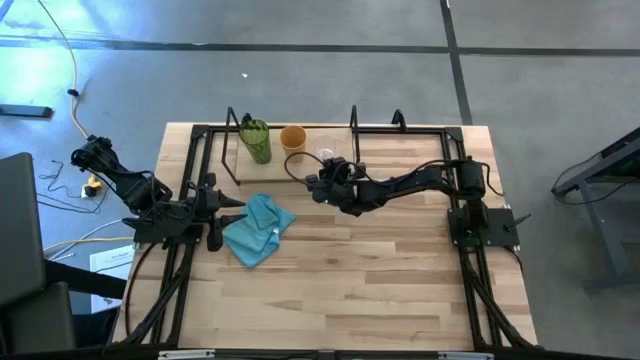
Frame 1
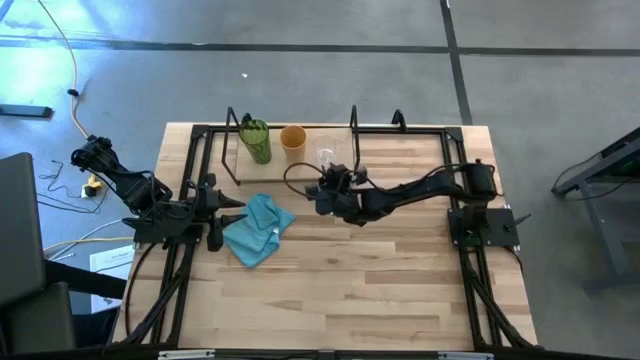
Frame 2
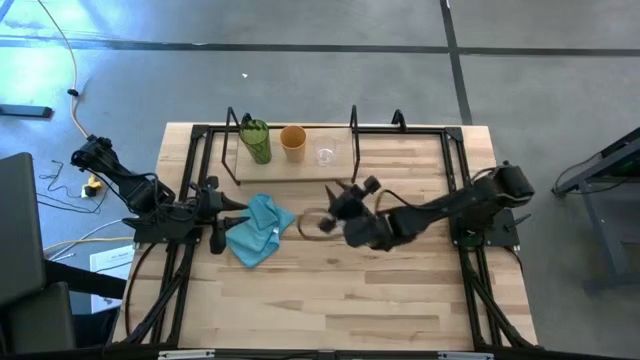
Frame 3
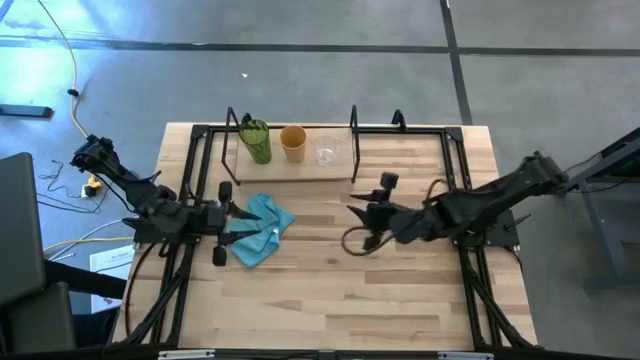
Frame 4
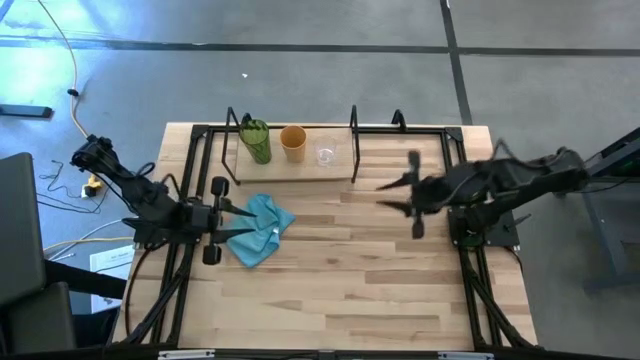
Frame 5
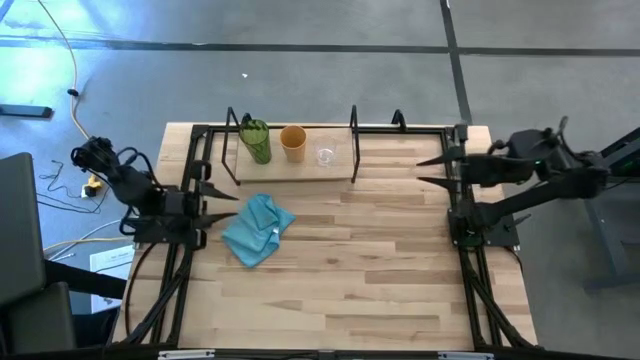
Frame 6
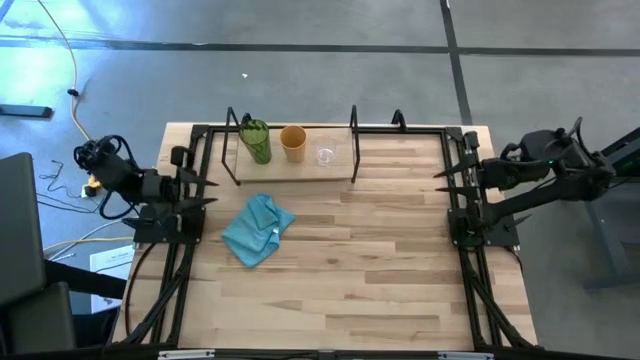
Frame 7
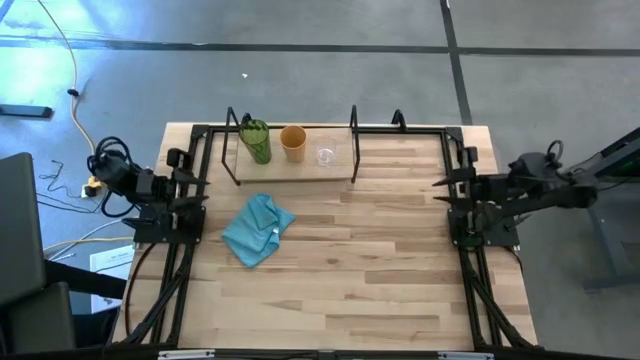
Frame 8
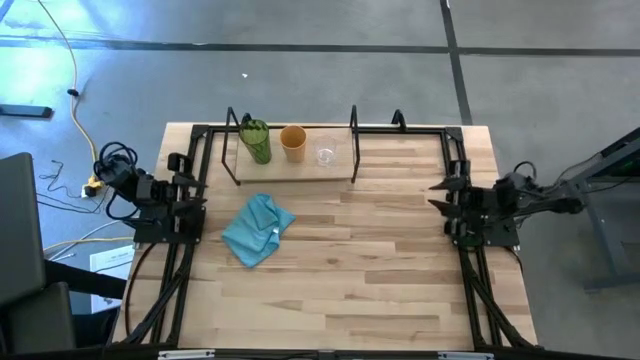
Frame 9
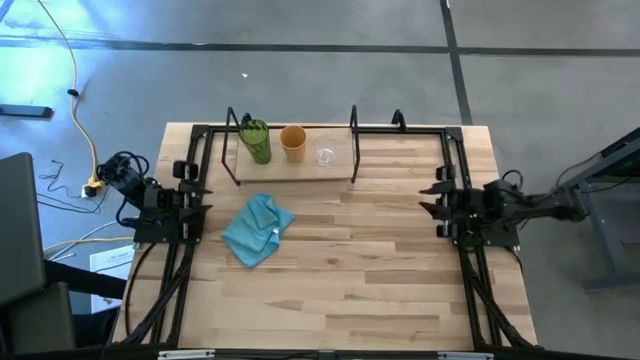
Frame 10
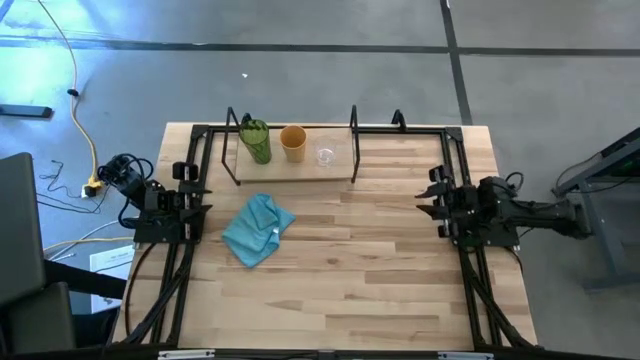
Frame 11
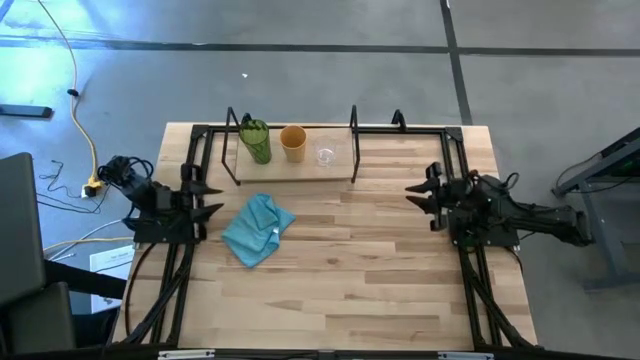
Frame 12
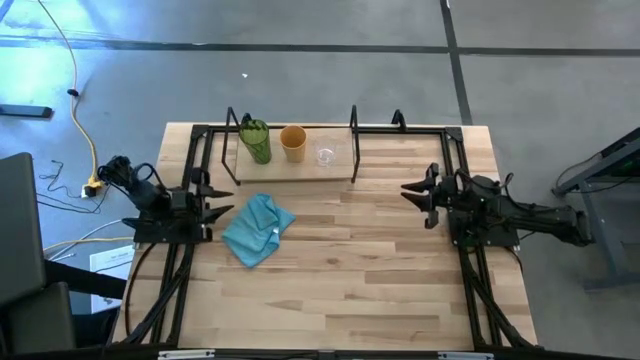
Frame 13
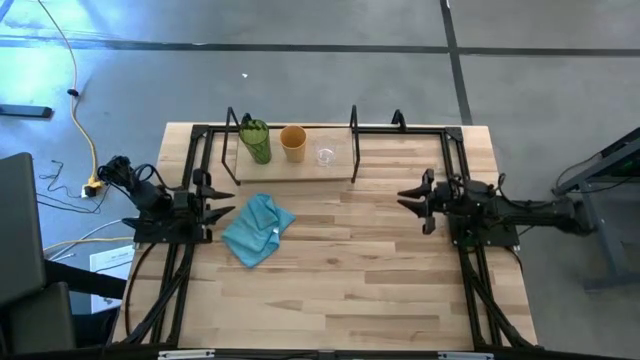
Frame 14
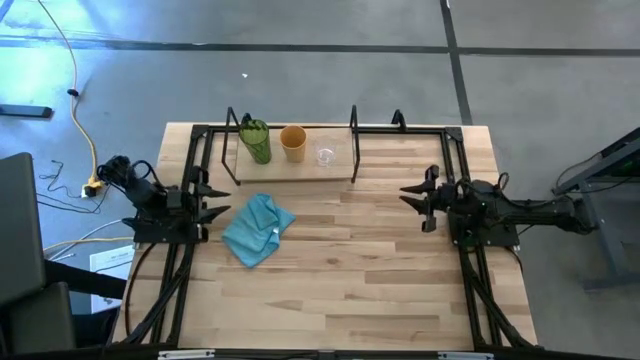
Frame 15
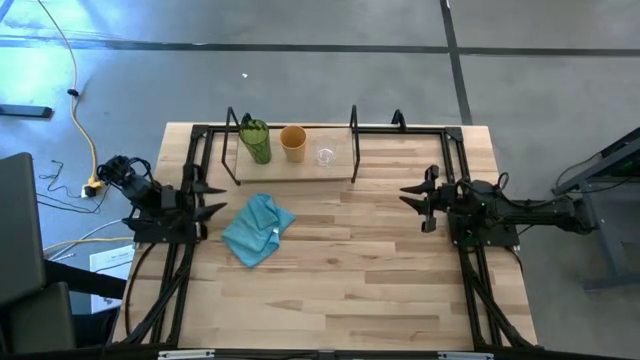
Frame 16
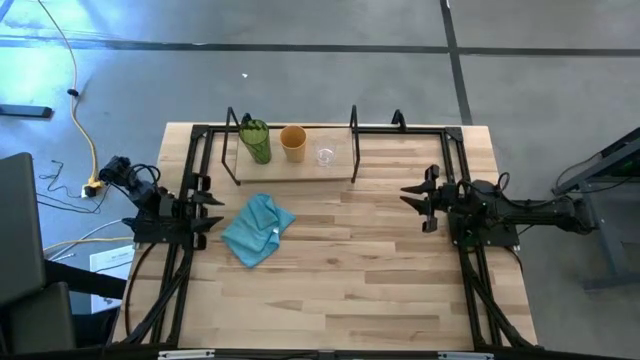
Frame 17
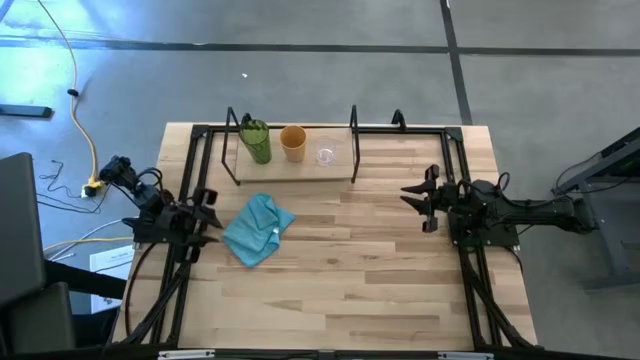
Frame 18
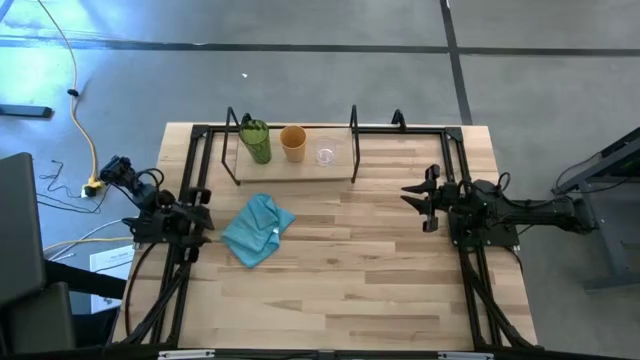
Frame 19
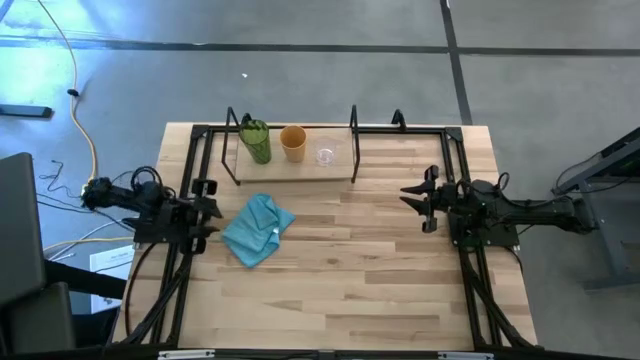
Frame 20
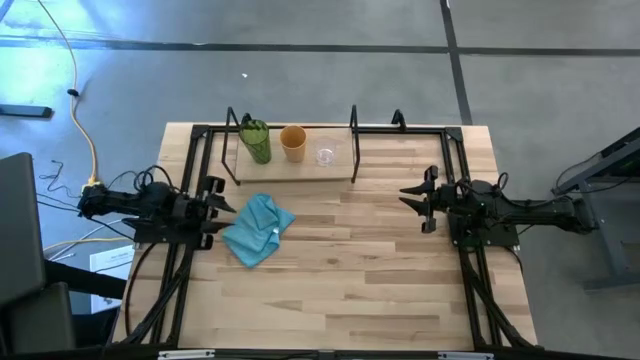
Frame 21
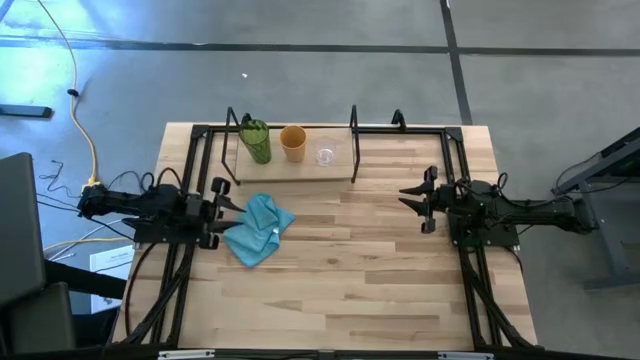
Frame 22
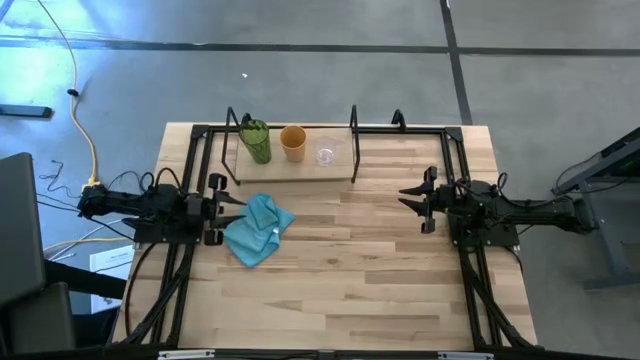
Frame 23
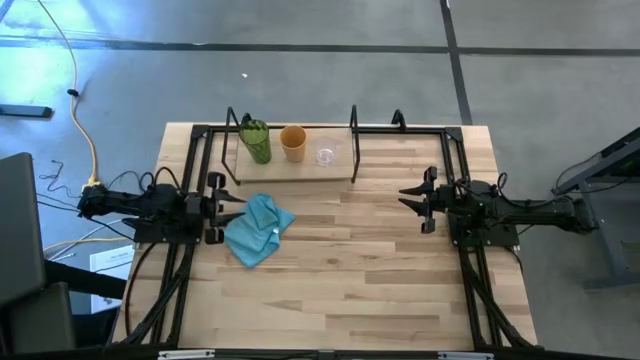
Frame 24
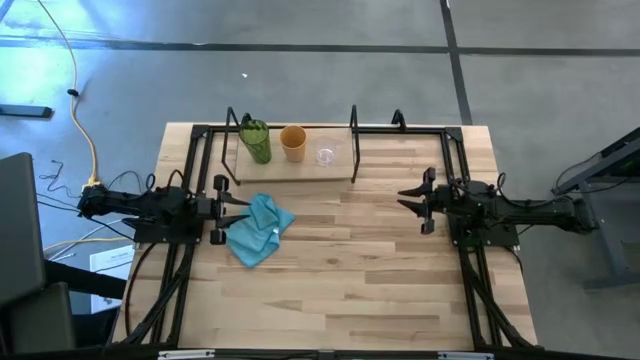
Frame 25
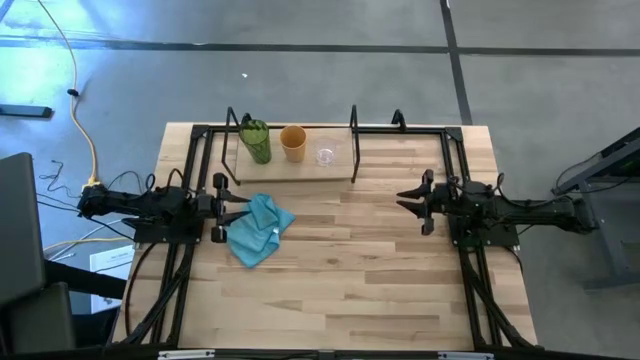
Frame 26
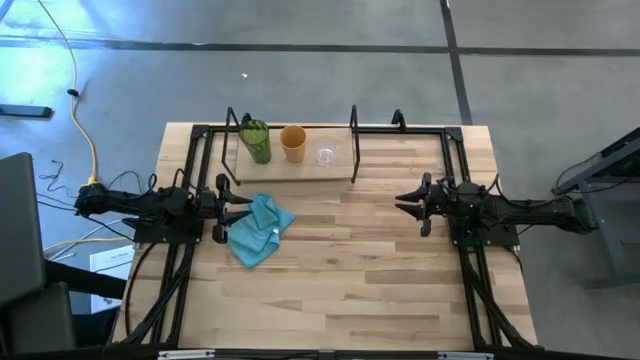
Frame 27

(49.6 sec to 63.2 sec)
Task: Stack small to large cups/mugs on shelf
Return to Home Position

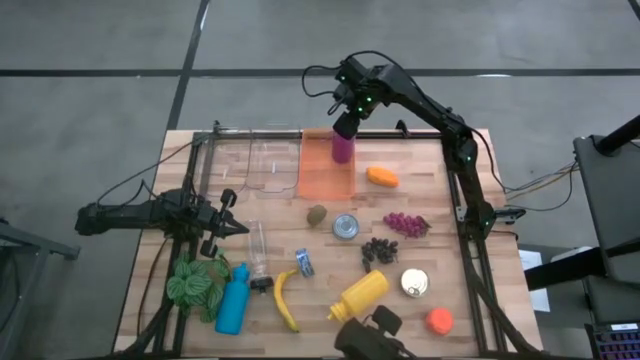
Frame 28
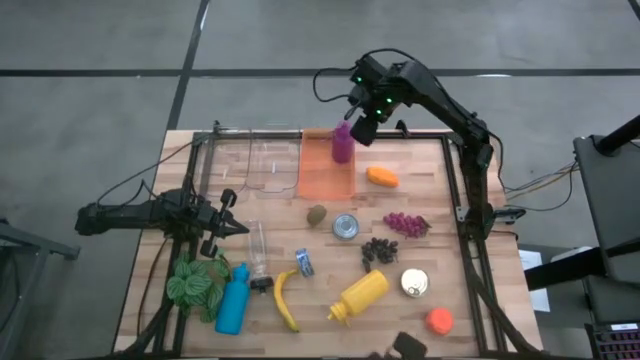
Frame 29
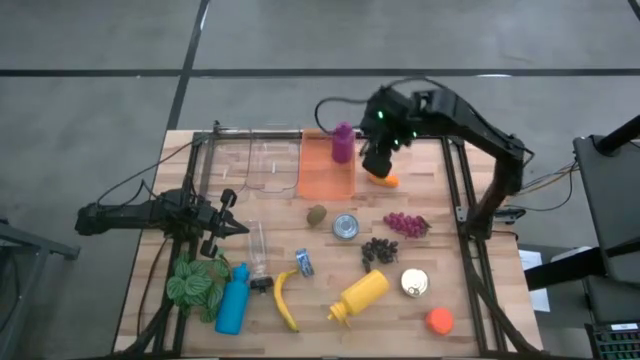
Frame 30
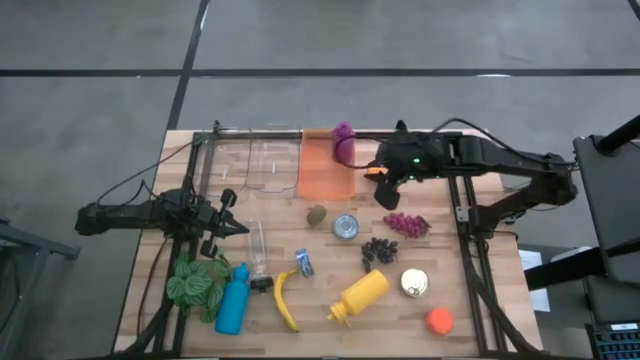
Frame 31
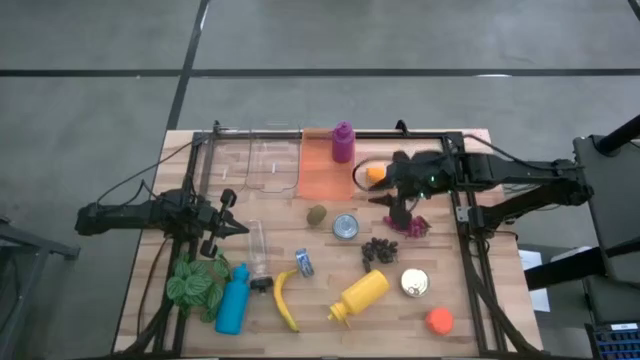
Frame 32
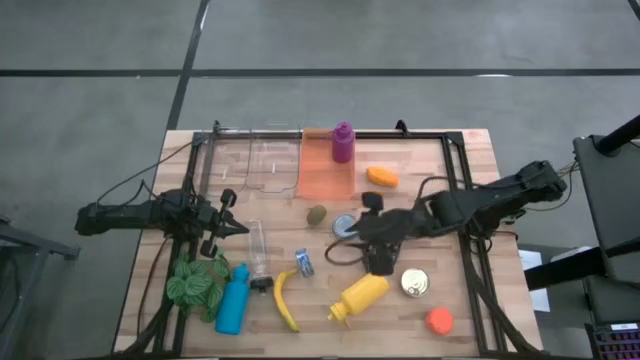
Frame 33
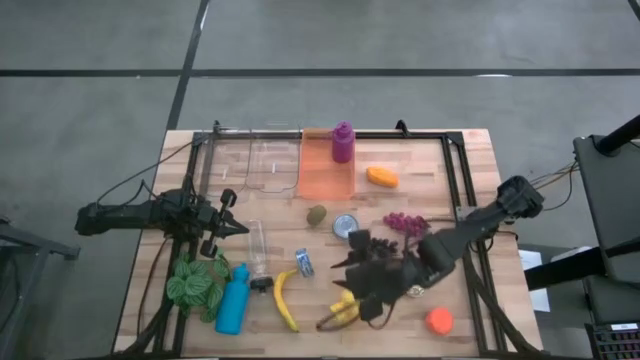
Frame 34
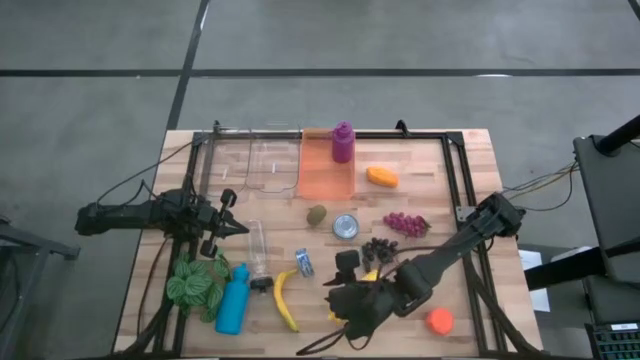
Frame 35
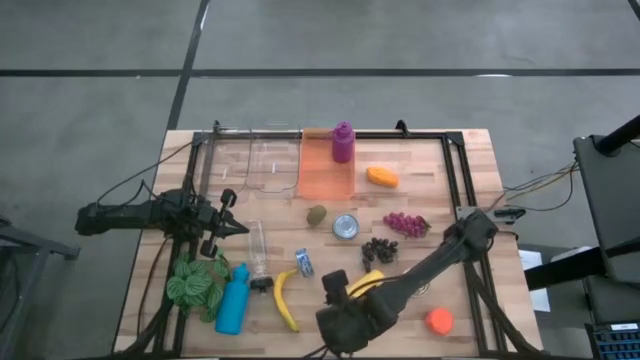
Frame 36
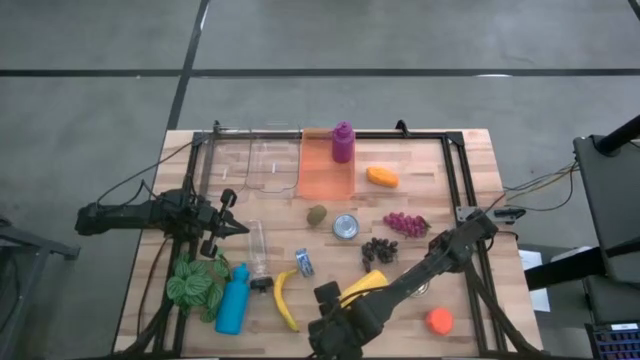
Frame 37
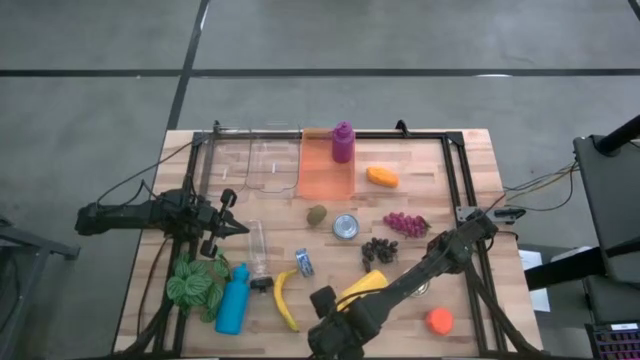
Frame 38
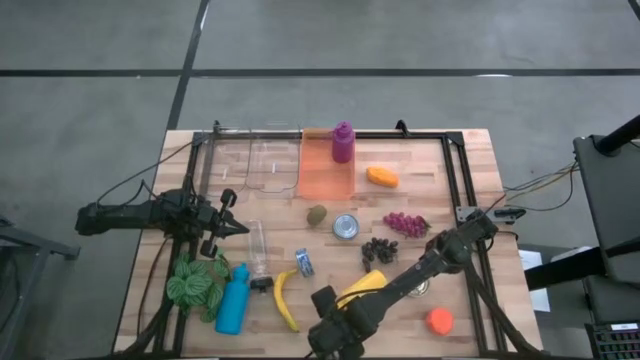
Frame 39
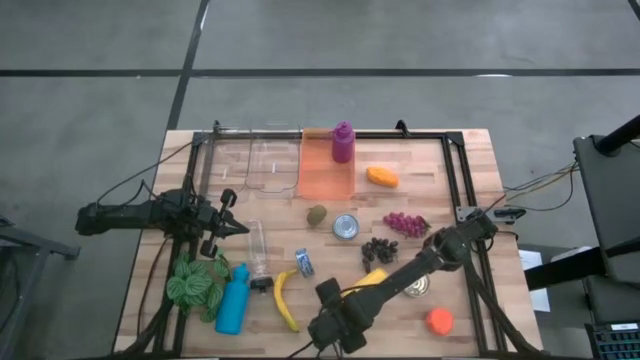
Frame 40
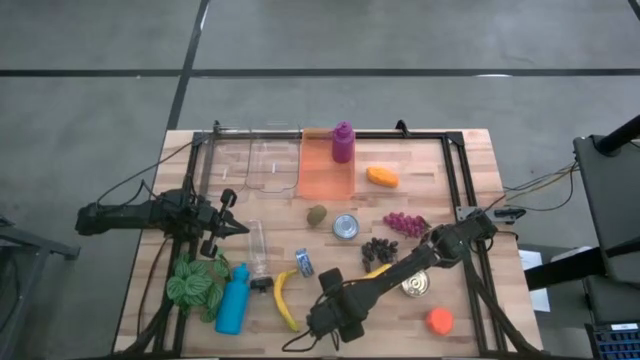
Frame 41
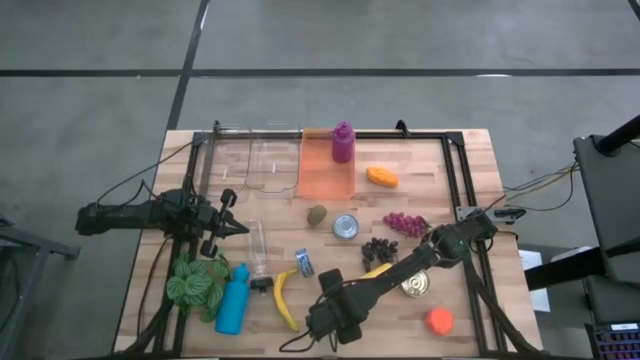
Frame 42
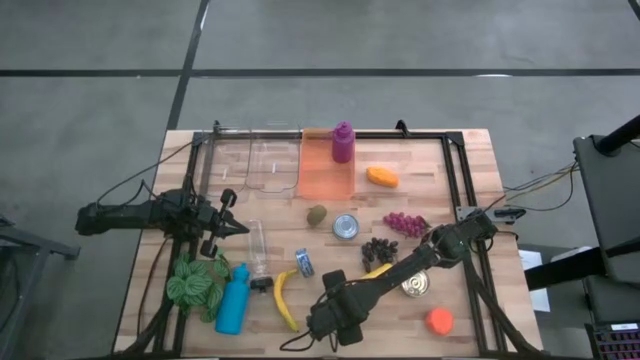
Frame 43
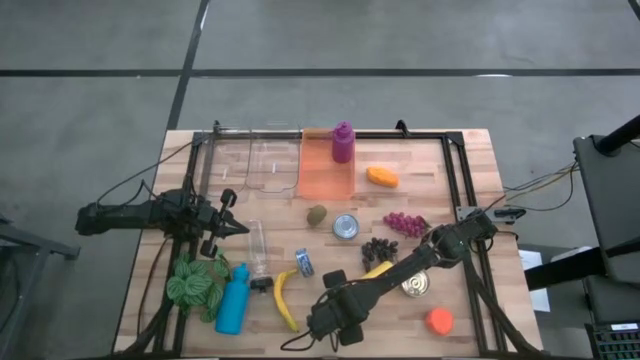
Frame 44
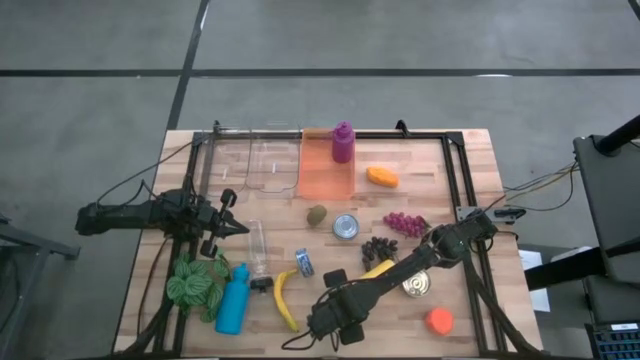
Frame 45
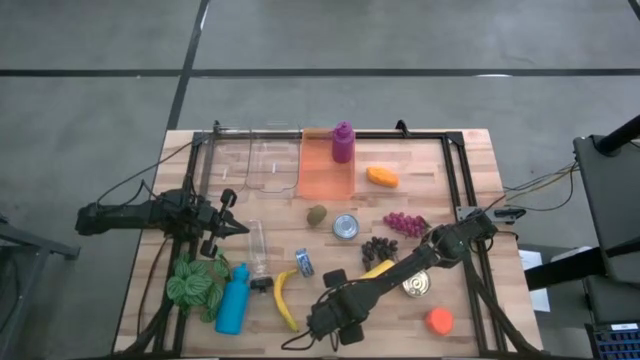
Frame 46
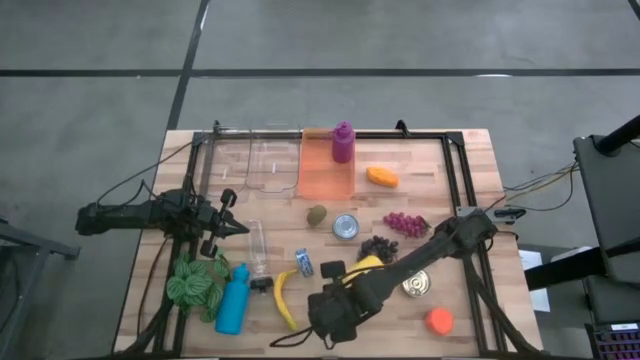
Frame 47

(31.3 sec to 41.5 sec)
Task: Pick & Place Food Item
Put the yellow tumbler into the orange bin
